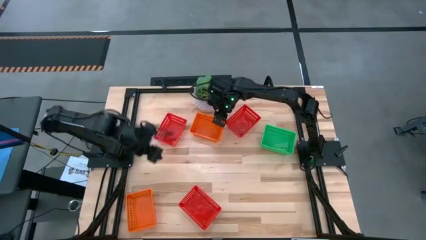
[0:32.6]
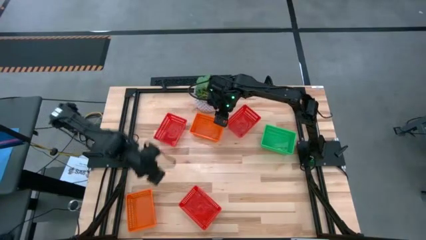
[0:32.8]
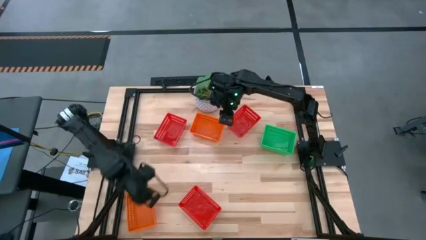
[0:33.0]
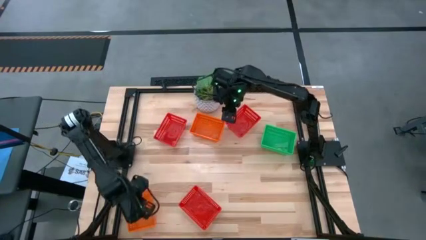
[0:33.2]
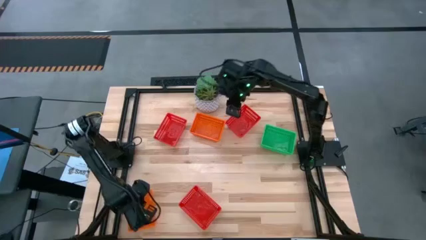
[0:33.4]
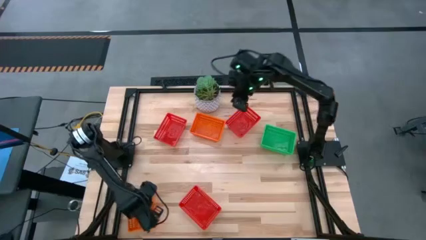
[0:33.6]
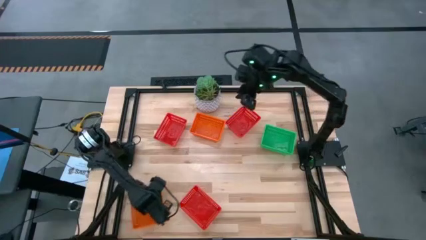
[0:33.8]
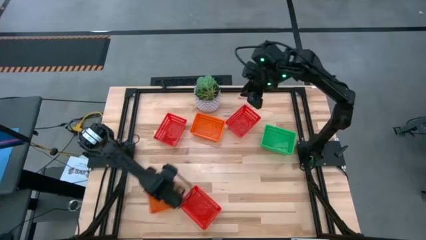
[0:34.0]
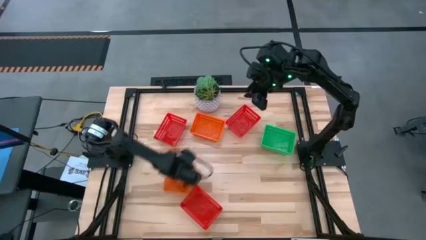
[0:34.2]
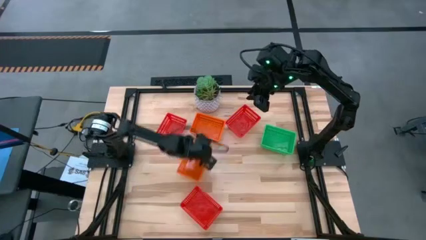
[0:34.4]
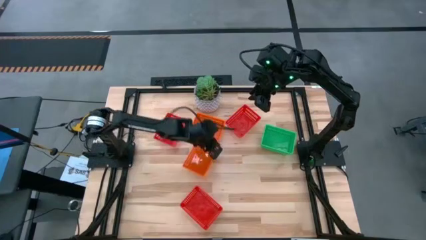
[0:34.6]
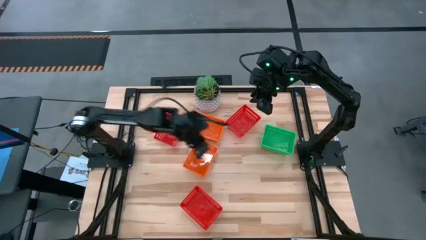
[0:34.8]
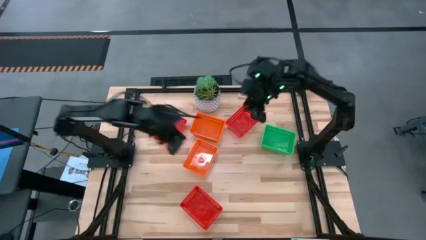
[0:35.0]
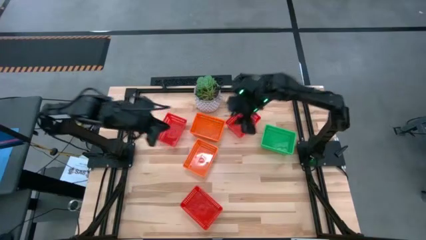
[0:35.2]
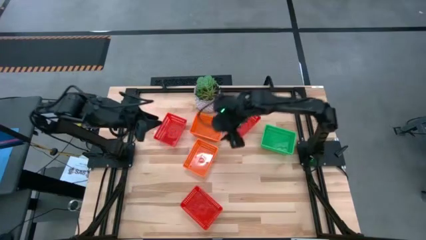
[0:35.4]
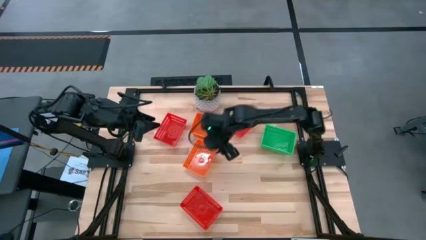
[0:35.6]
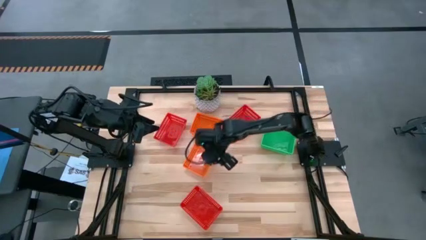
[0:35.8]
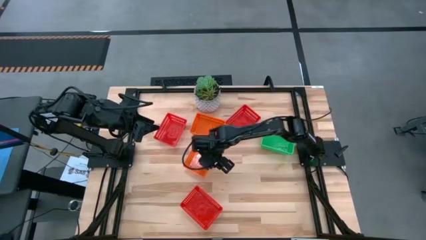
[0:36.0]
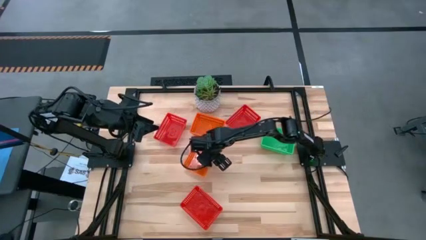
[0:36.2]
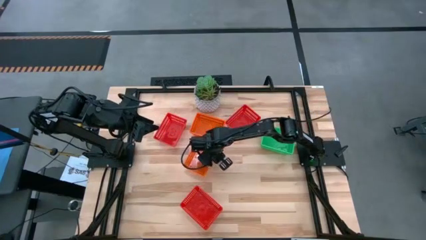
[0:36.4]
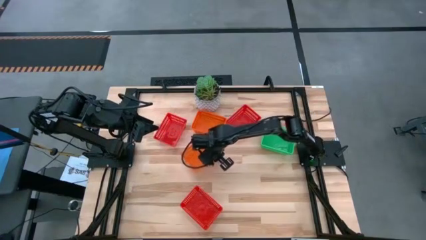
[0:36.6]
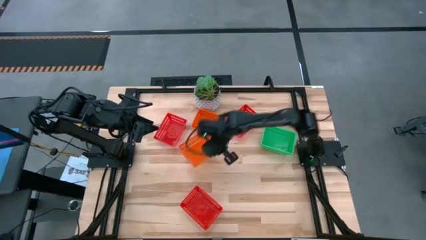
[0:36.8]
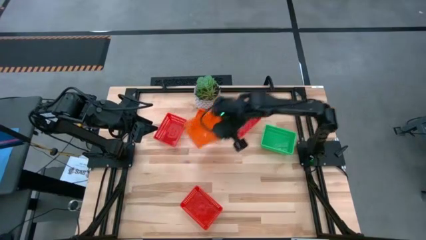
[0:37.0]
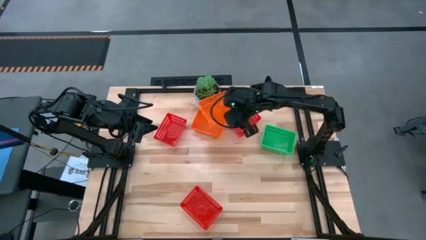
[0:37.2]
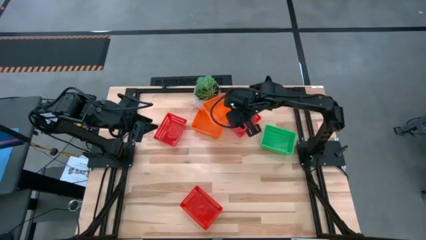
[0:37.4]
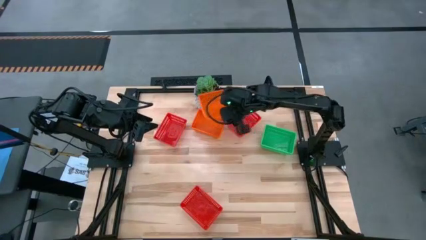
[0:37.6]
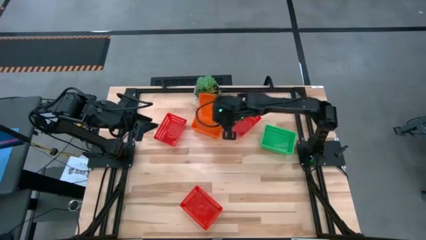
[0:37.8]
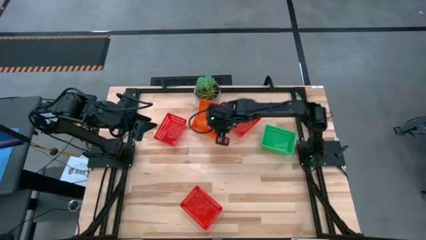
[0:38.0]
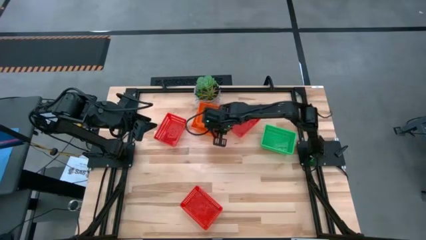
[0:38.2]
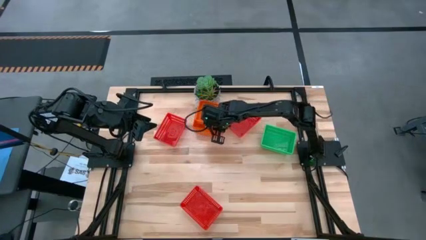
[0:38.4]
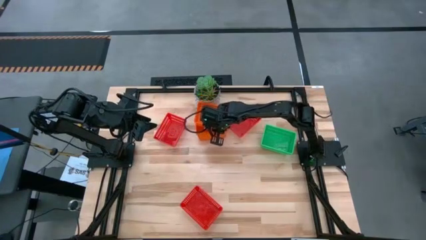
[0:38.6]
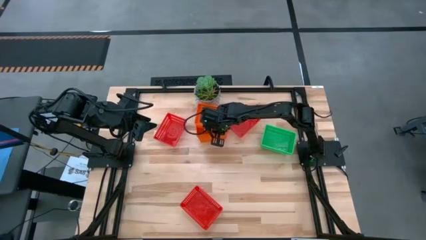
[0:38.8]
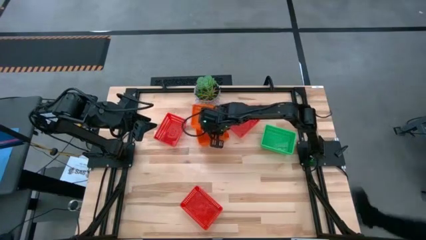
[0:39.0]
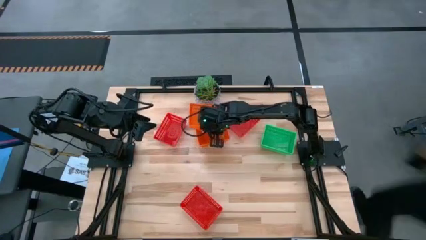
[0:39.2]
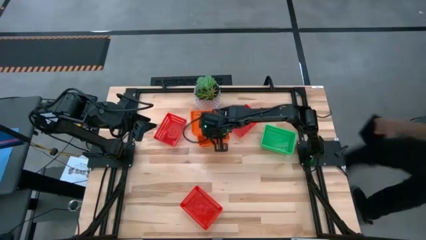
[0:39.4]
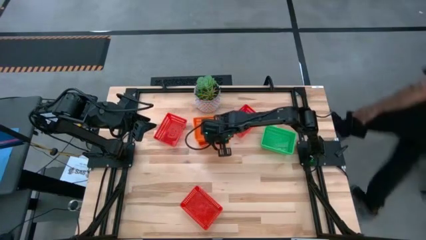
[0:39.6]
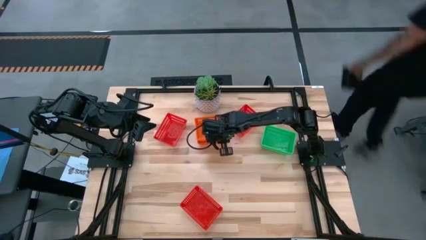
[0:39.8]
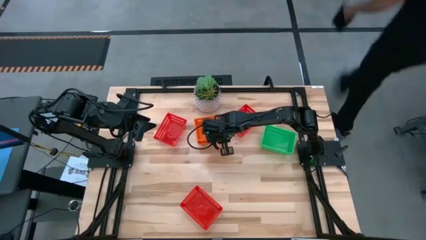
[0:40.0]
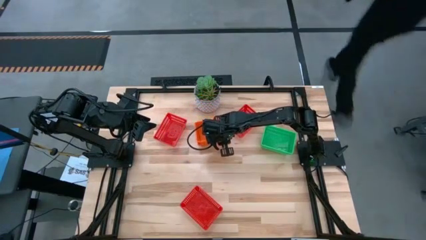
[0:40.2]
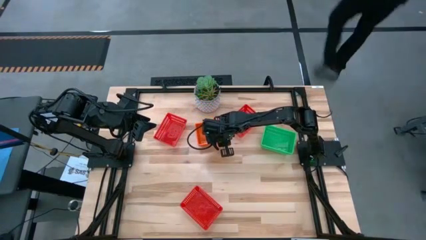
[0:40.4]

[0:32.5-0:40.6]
Stack the bottom orange bin into the stacked orange bin

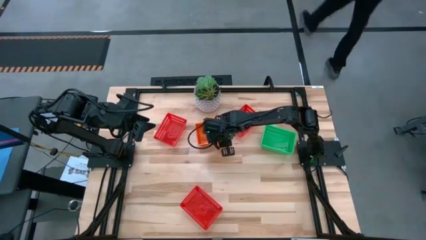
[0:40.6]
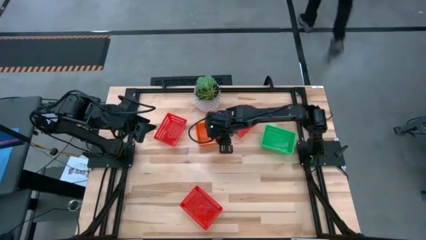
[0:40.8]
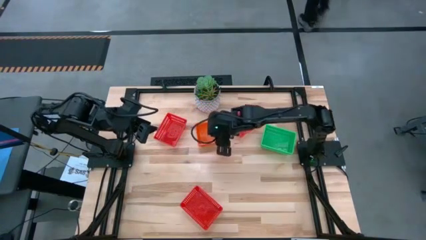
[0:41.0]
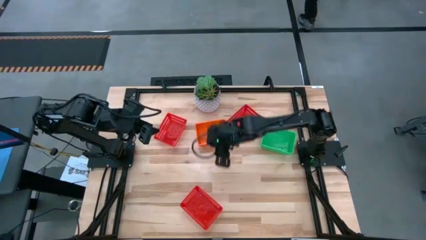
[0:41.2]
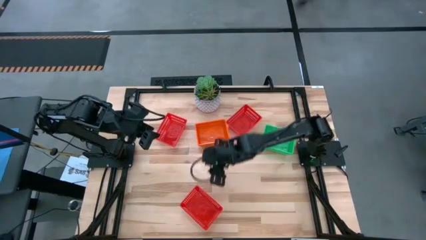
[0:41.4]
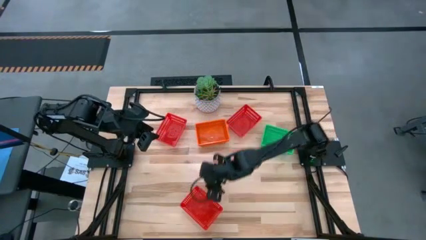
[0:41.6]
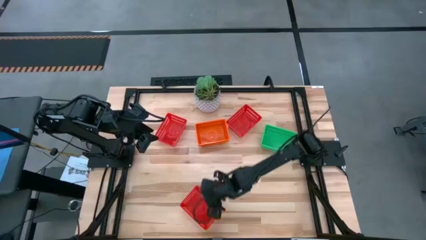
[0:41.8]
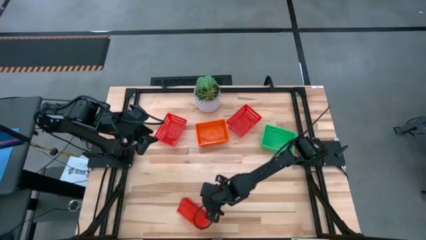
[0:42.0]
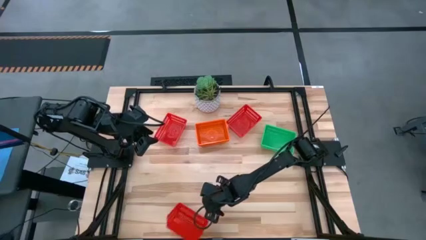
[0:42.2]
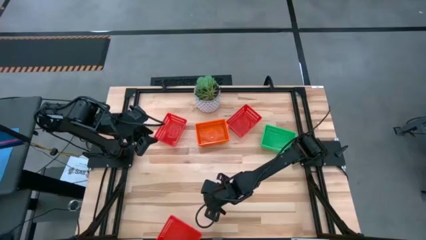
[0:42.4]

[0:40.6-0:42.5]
Stack the bottom red bin into the top right red bin

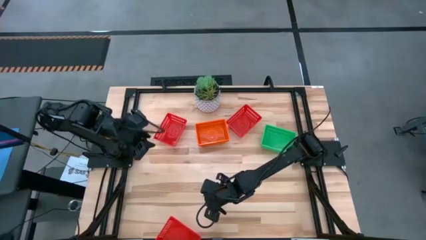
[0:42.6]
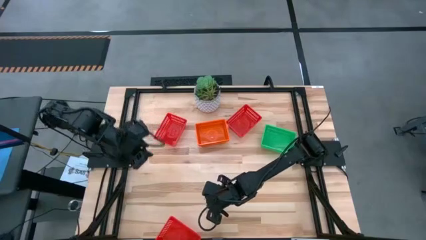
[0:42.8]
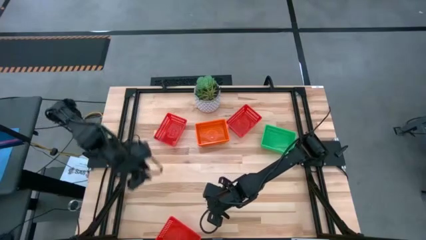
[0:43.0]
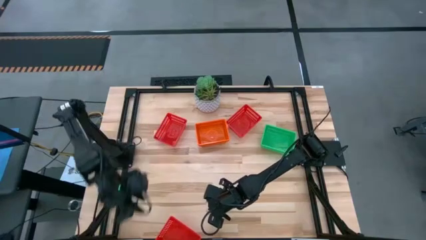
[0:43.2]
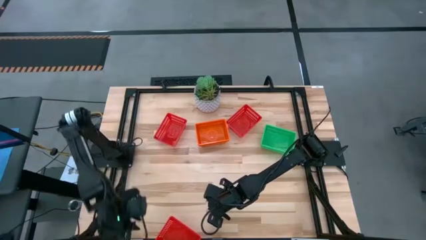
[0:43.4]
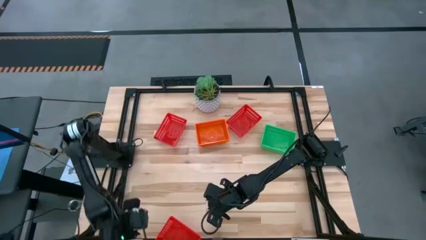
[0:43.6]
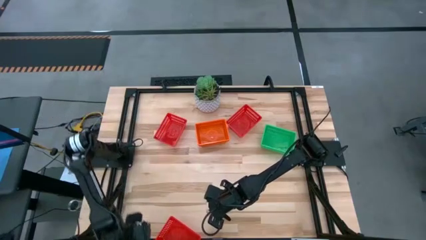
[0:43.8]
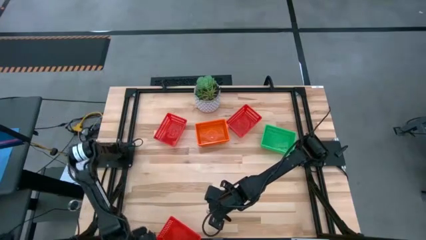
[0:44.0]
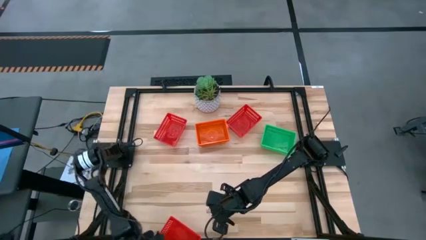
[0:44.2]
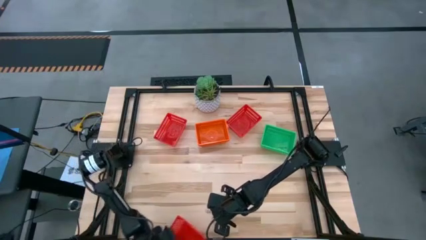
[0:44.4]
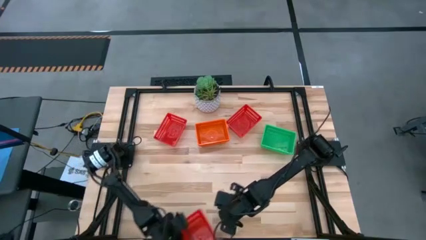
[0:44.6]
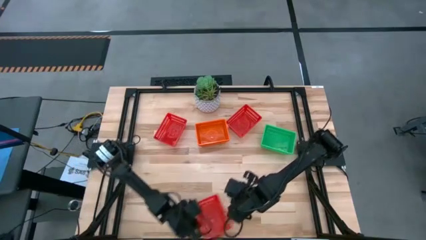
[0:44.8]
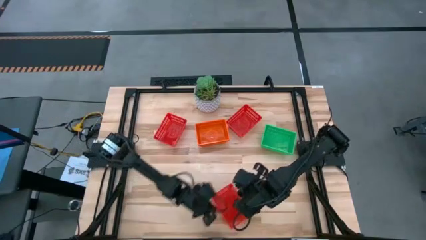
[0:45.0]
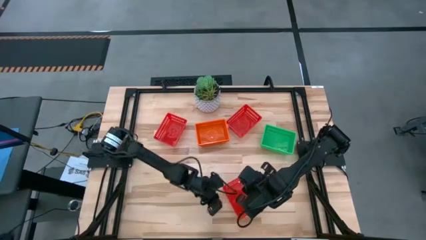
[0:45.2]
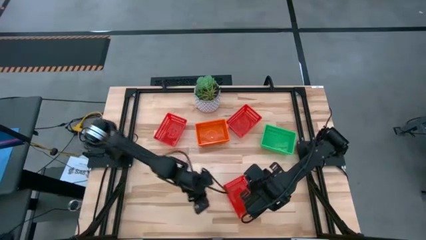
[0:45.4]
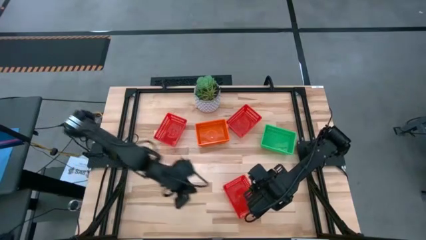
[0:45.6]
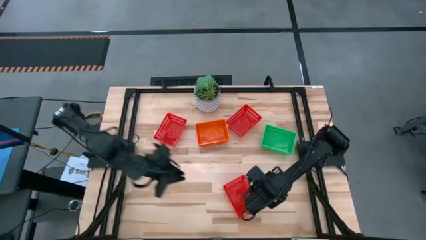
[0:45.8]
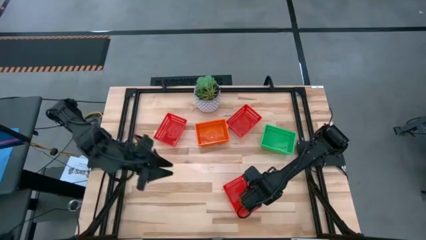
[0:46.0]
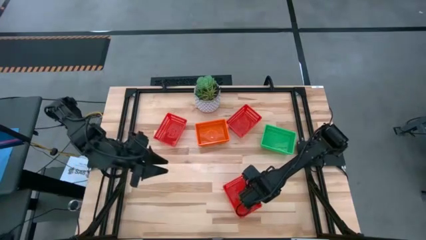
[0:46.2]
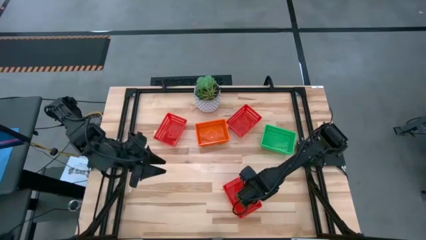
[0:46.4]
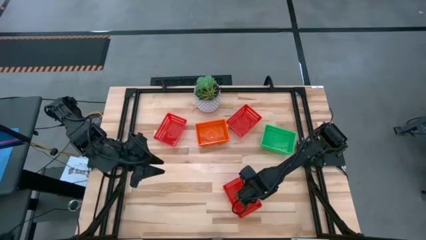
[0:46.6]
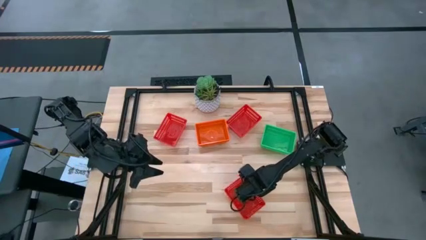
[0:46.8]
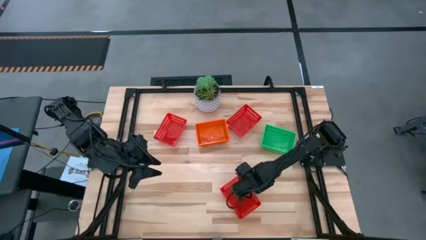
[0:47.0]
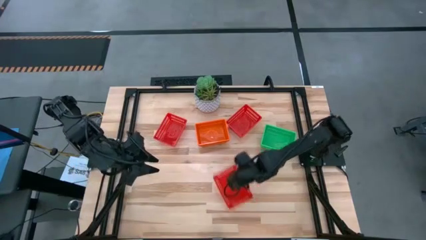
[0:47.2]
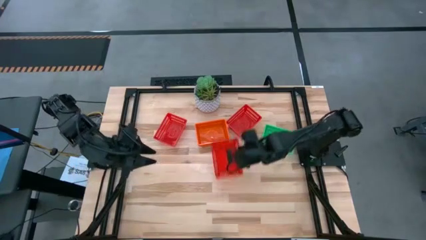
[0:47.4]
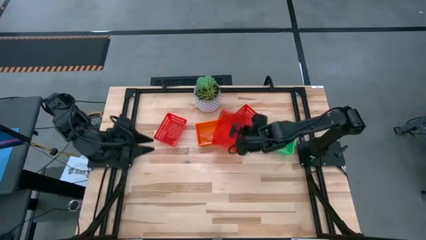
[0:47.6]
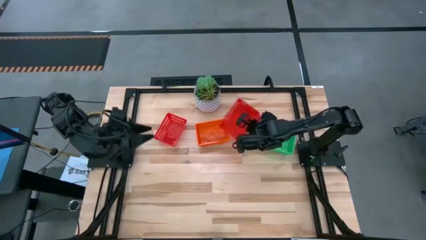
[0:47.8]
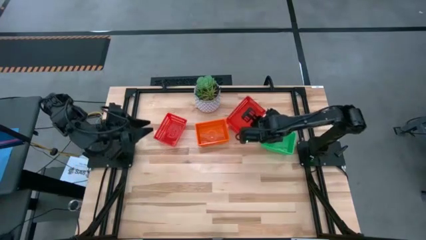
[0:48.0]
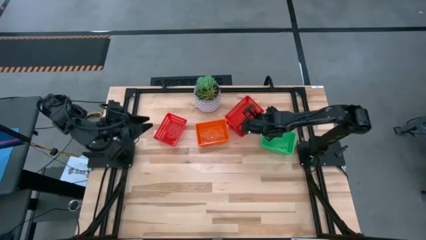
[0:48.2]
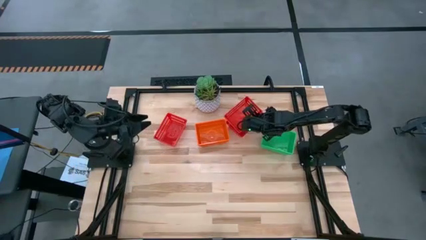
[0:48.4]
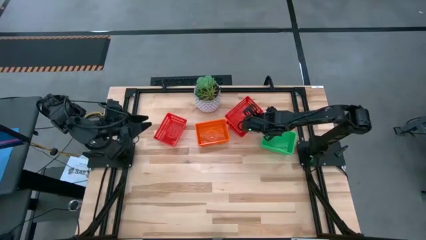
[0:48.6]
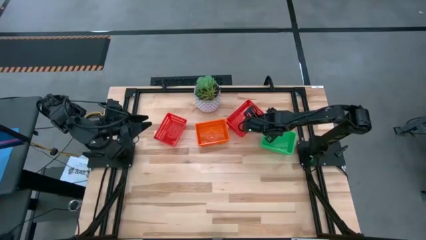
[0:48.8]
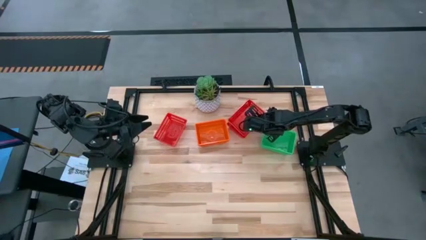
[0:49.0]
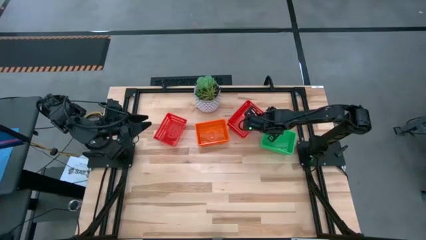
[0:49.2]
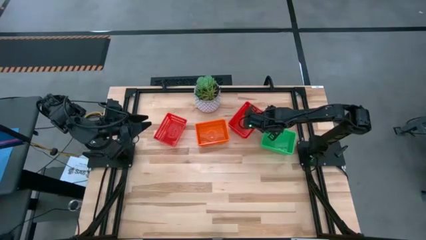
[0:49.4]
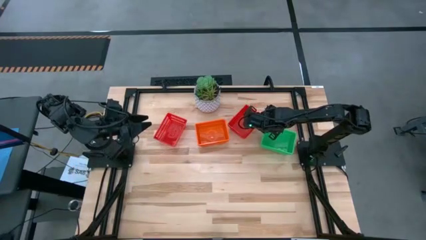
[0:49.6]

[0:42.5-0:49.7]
Stack the bottom red bin into the top right red bin
